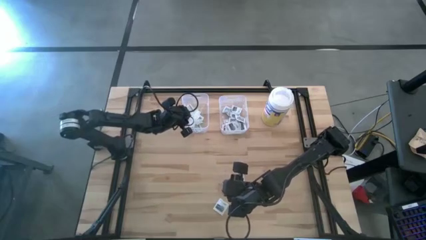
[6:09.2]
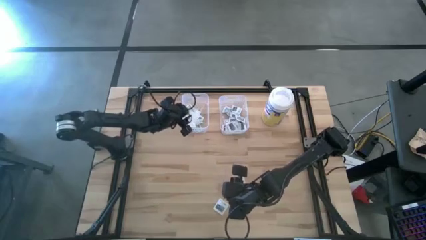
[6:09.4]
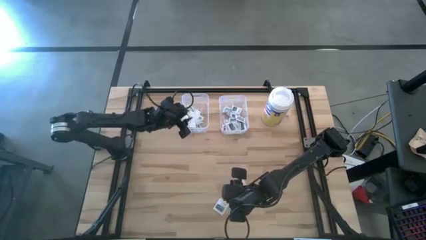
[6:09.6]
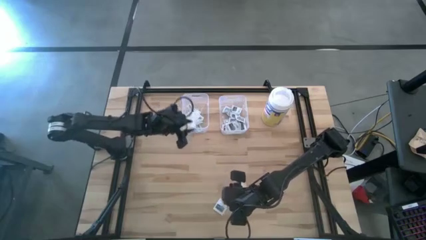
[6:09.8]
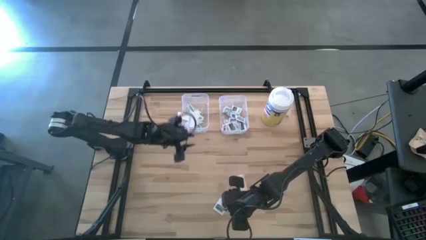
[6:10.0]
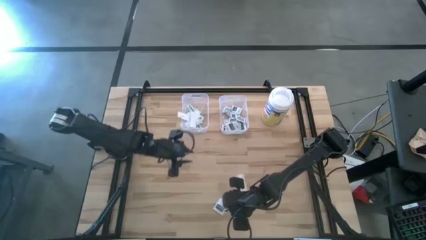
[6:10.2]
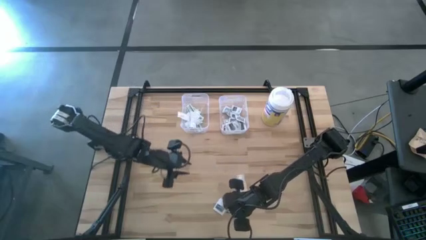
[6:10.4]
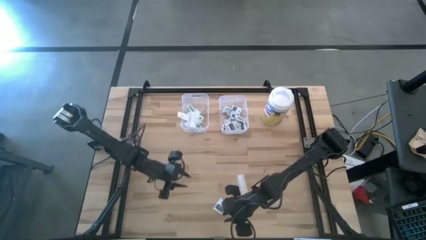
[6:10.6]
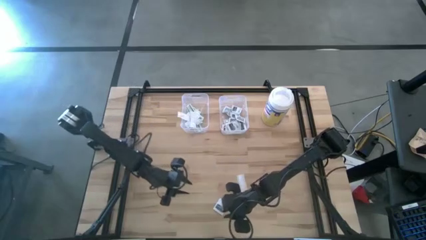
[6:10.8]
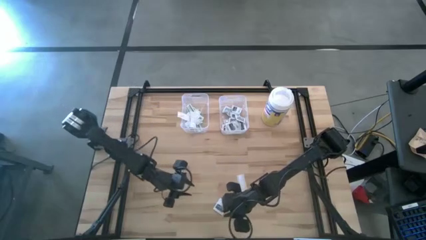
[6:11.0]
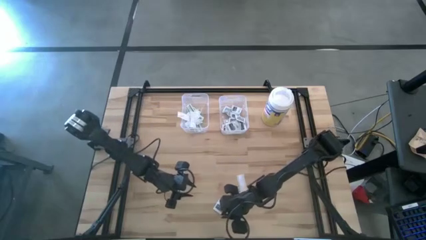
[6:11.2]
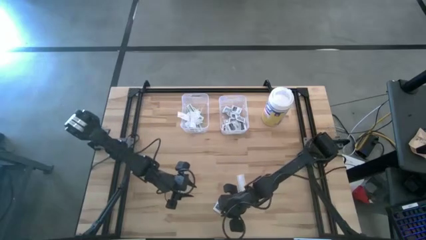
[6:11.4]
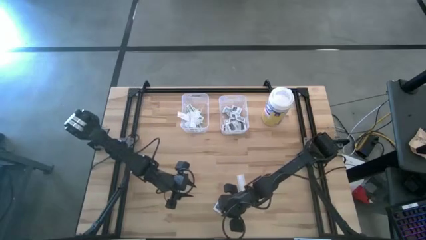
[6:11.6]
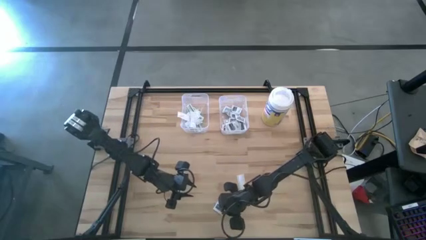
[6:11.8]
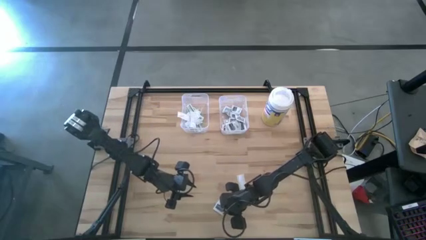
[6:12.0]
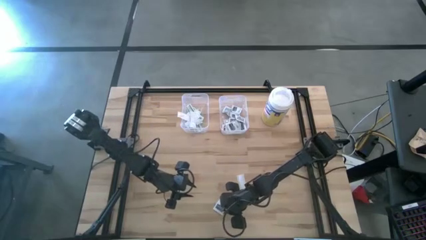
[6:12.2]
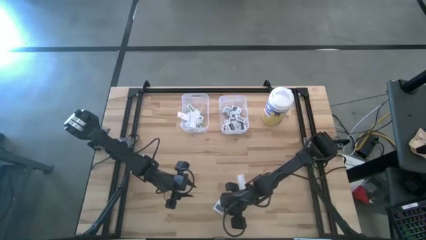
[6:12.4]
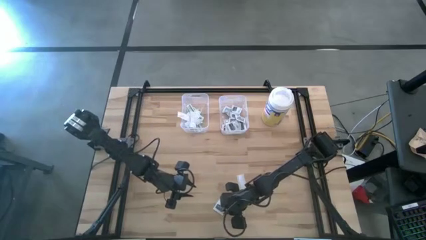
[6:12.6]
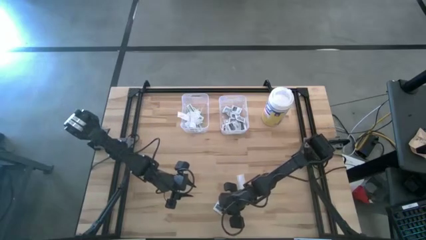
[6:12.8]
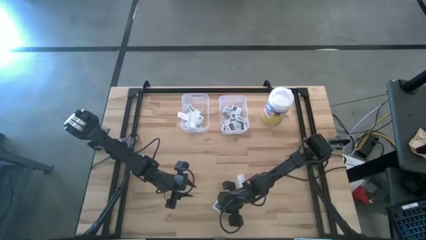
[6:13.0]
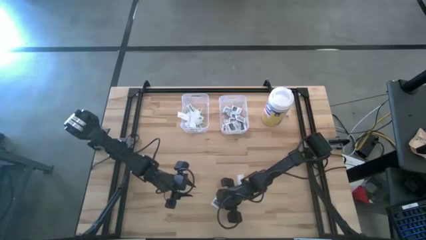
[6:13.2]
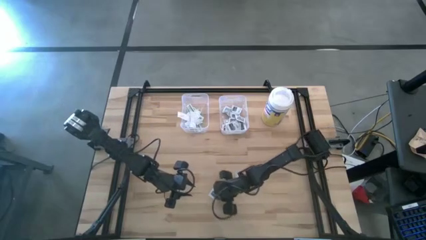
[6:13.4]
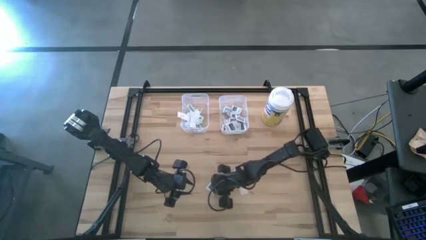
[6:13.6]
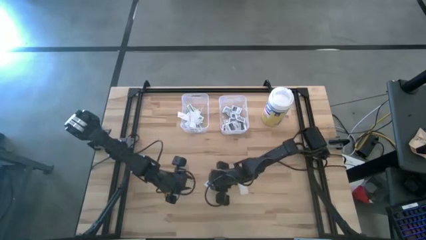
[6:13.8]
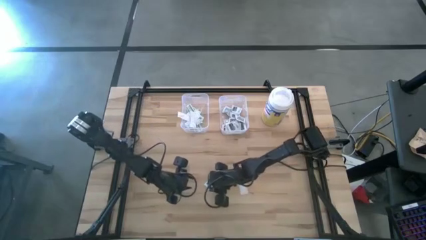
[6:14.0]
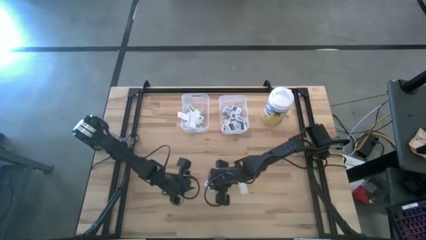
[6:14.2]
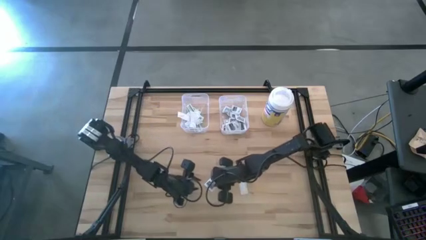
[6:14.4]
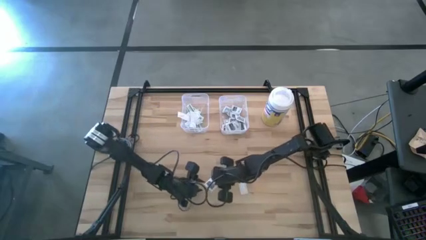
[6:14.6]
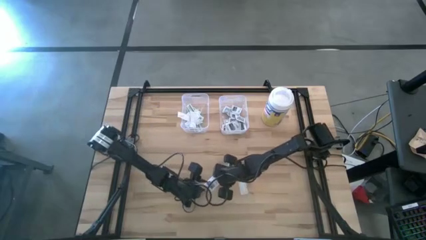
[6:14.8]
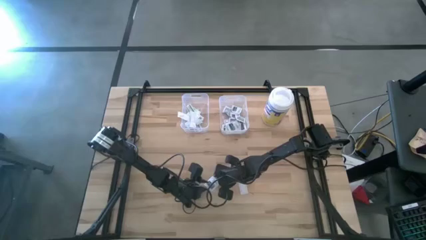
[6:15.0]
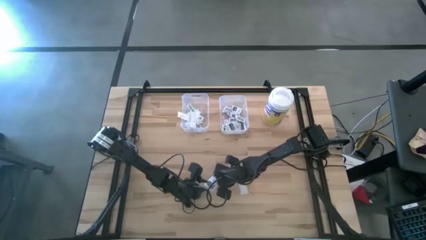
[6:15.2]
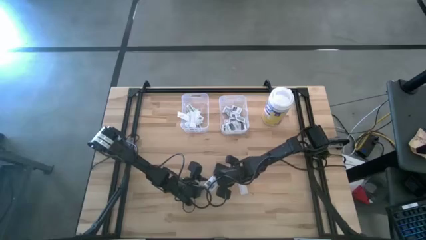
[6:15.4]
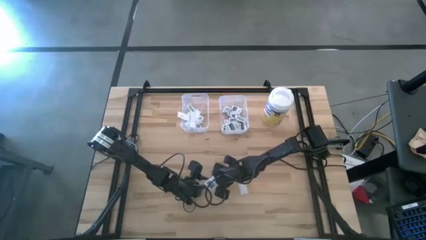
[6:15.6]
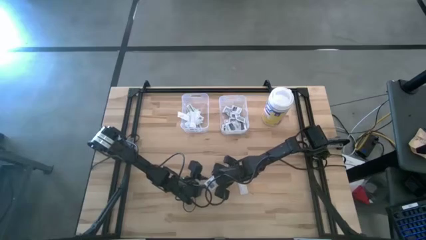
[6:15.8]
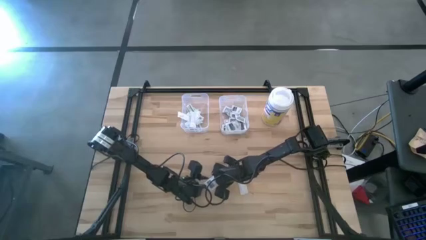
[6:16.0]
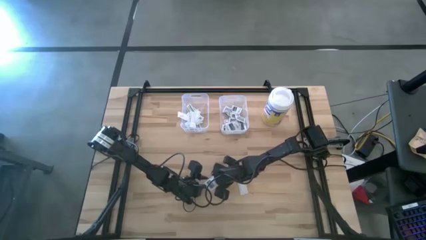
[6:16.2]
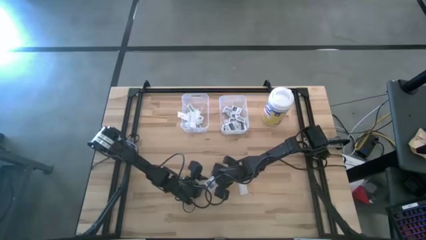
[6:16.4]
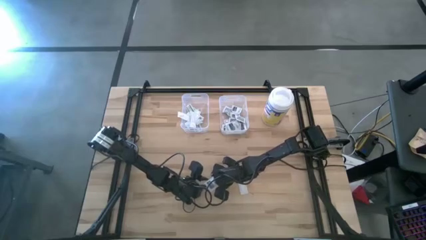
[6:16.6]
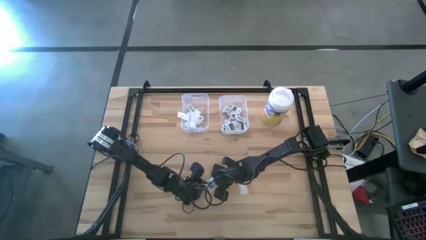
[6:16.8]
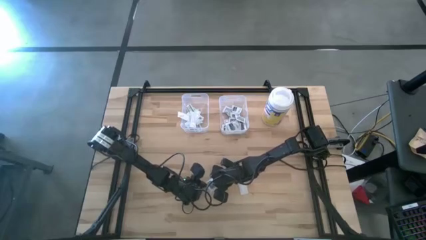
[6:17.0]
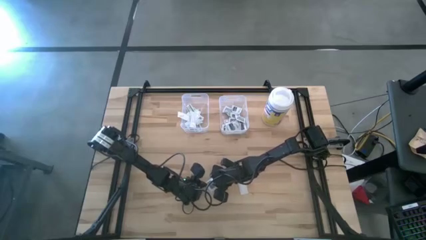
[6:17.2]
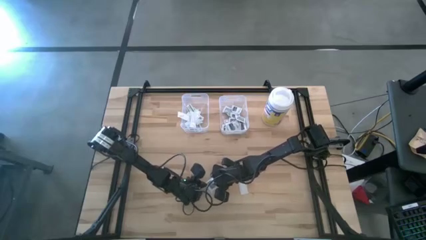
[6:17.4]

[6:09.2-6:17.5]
Task: Pick & Place First Aid Supplies
Put the gray towelette pack into the right transparent bin

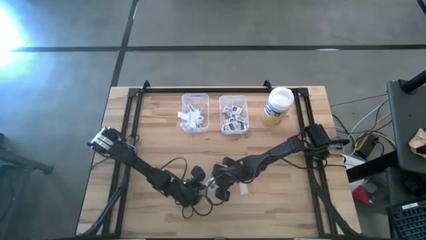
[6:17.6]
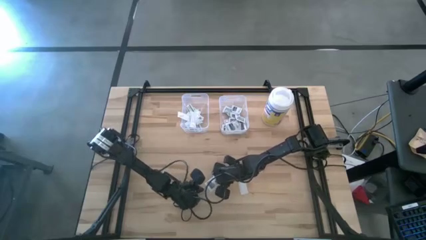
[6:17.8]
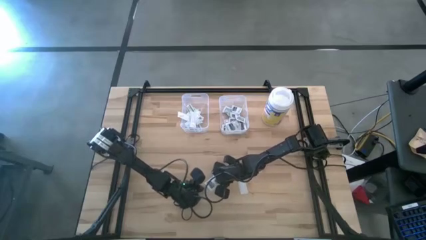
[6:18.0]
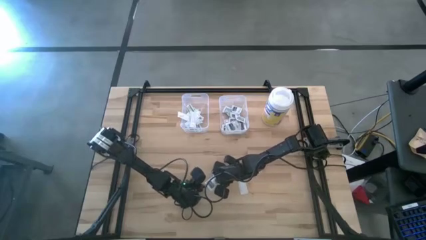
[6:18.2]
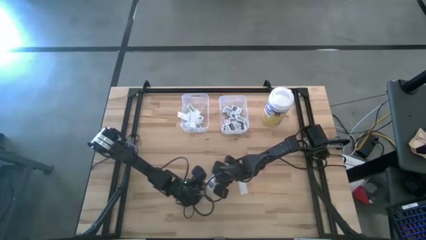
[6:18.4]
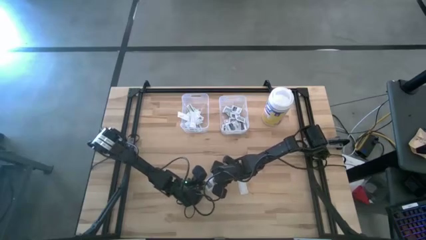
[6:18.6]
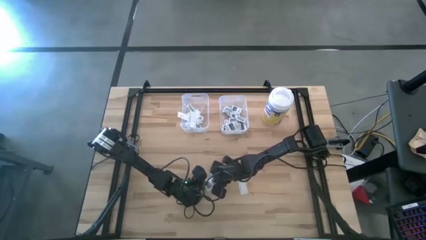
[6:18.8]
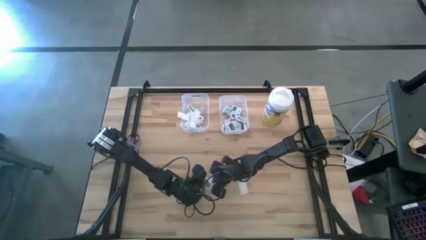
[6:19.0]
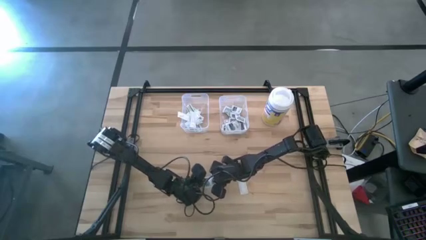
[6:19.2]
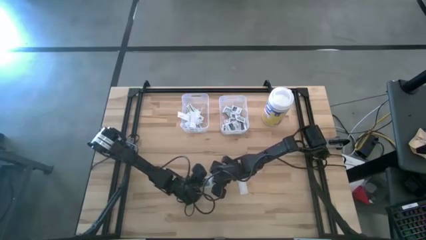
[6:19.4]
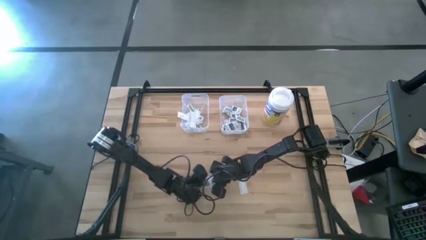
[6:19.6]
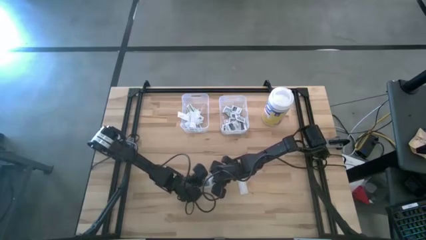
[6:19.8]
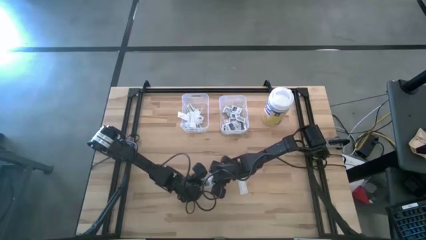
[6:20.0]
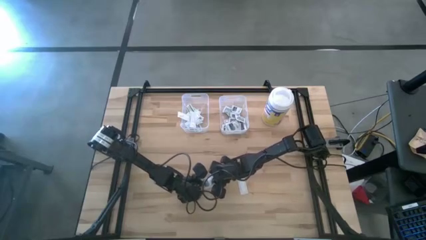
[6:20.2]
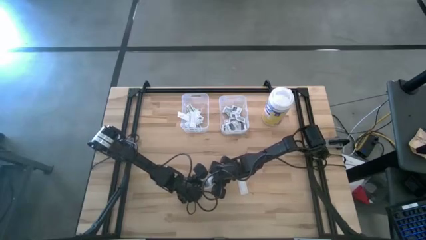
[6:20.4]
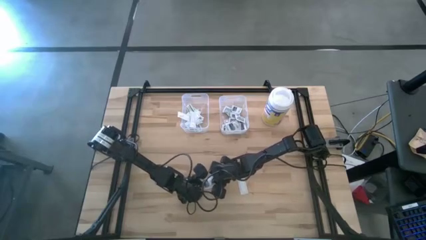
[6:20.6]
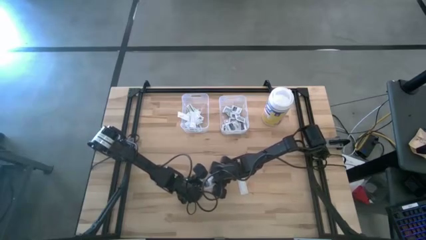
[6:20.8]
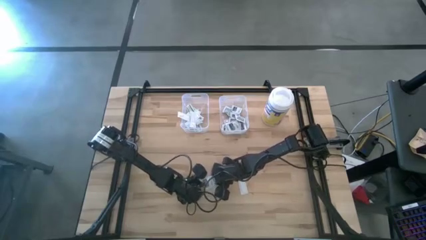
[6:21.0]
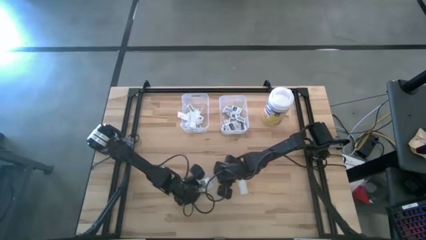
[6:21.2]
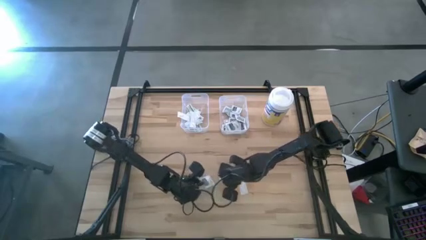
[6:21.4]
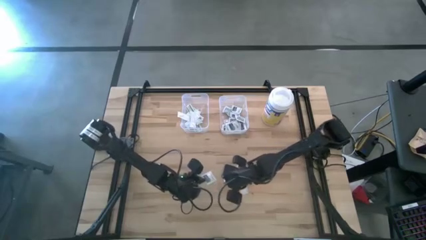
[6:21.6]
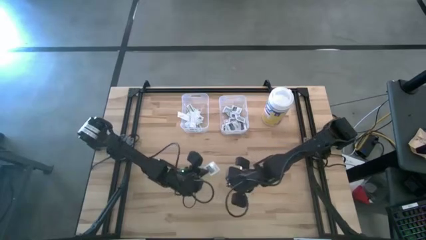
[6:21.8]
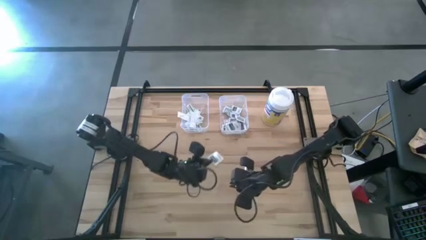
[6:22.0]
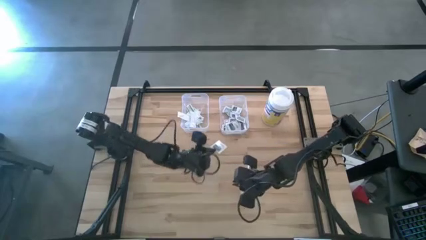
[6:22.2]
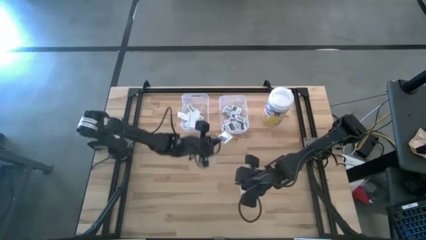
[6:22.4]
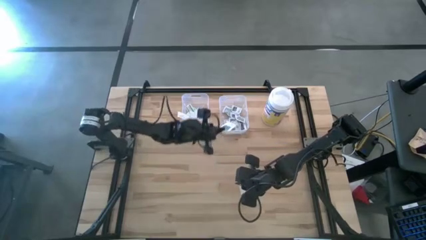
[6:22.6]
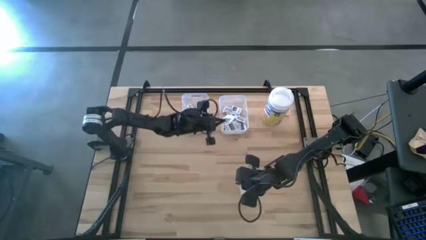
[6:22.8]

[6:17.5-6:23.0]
Put the gray towelette pack into the right transparent bin

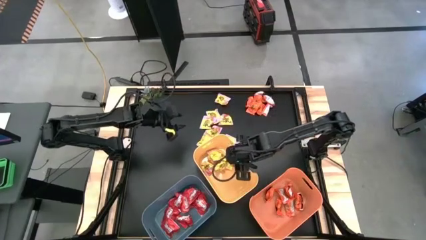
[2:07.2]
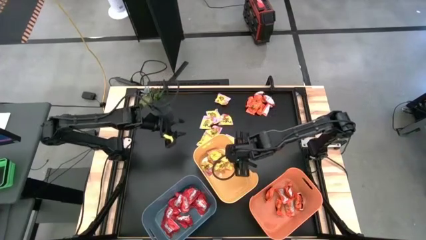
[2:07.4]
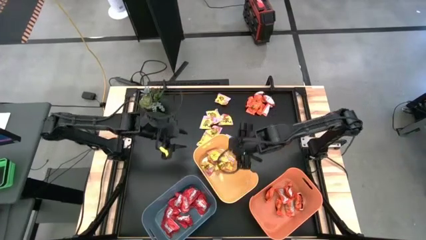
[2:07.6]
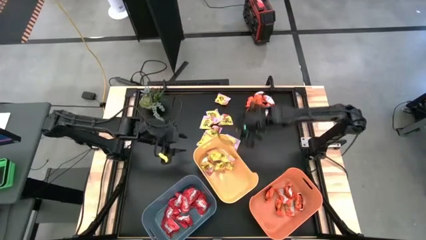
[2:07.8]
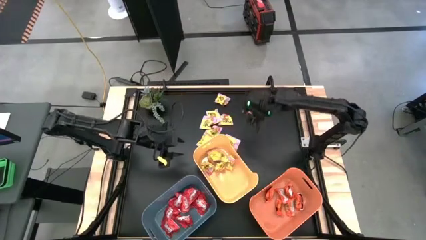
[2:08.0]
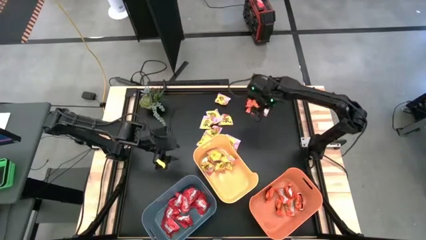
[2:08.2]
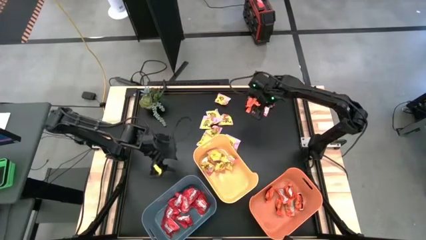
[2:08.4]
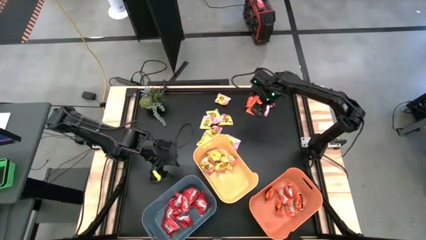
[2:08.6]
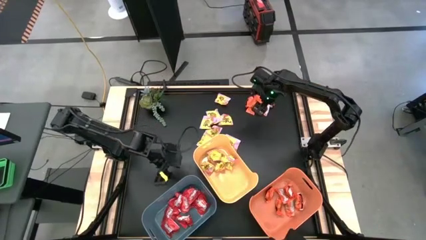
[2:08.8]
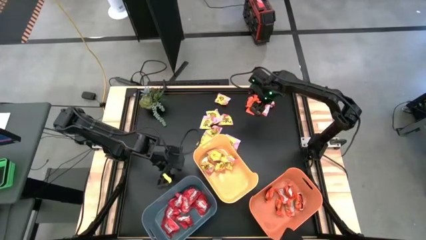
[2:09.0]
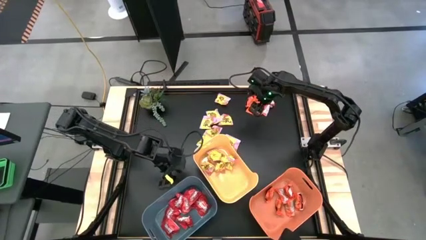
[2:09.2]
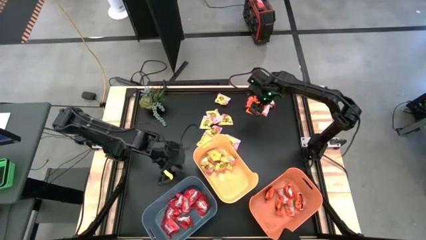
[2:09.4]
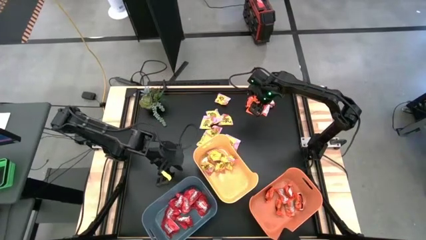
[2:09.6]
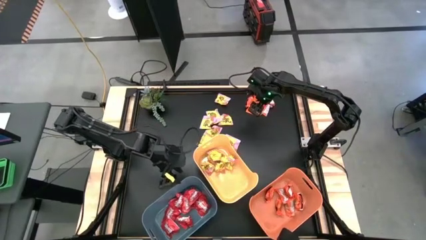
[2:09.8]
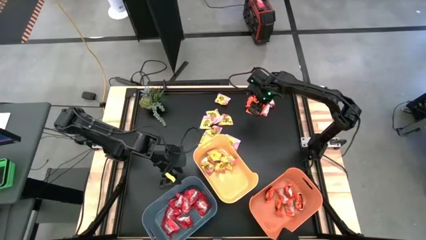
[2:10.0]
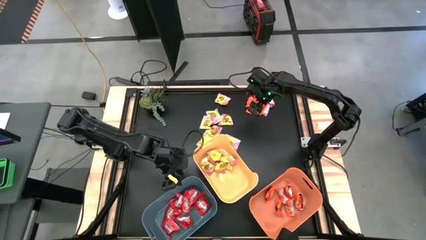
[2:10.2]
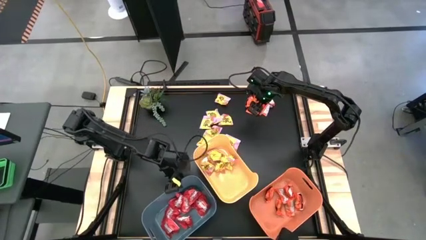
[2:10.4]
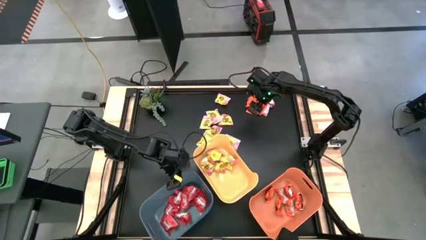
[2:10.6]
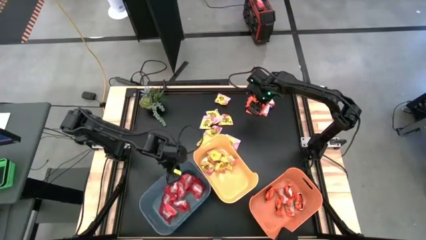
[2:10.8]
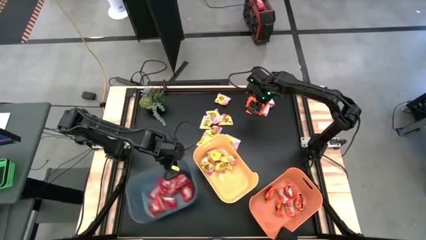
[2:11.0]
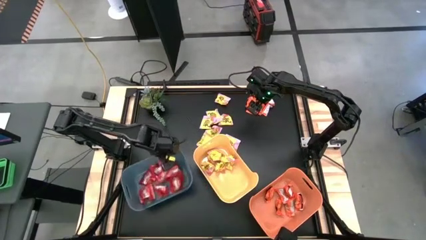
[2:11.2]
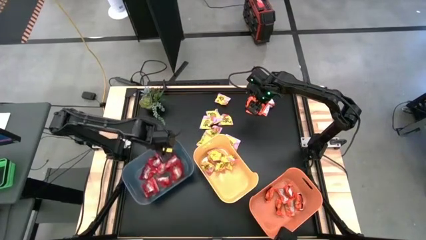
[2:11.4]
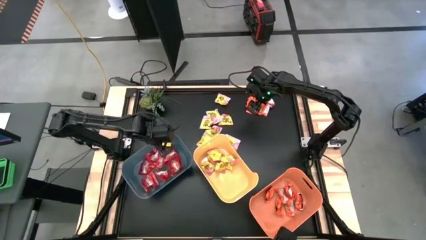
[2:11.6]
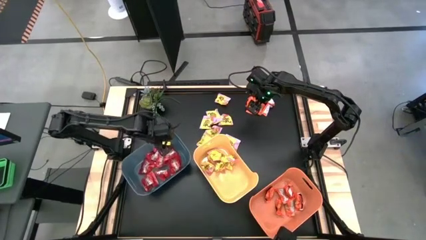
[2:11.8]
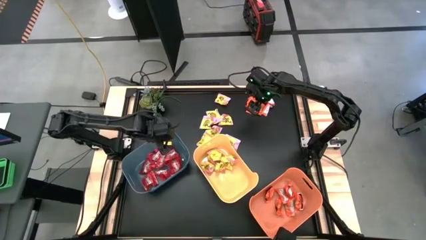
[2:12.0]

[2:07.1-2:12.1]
Task: Sort candy
Move the blue bin to the middle left
